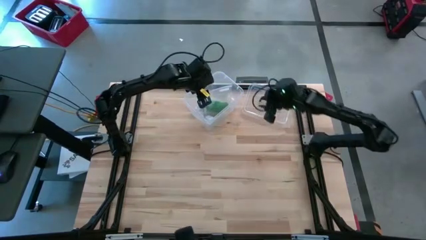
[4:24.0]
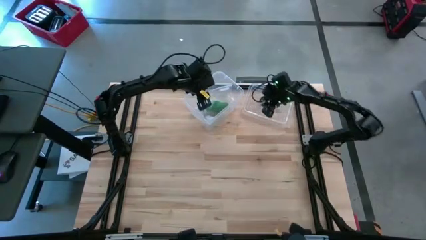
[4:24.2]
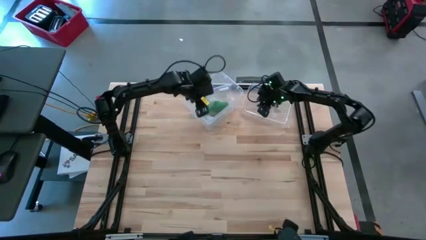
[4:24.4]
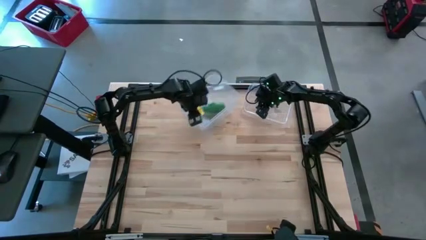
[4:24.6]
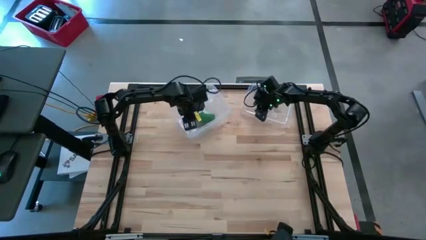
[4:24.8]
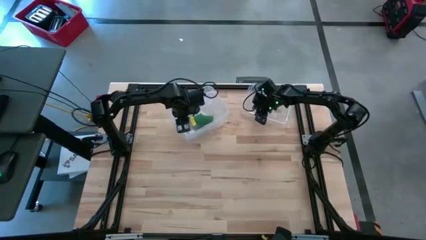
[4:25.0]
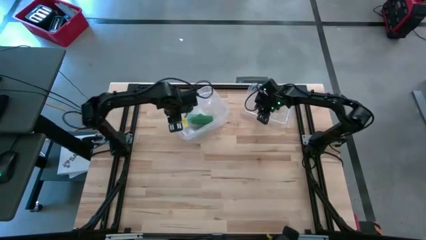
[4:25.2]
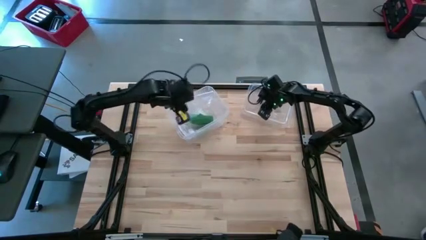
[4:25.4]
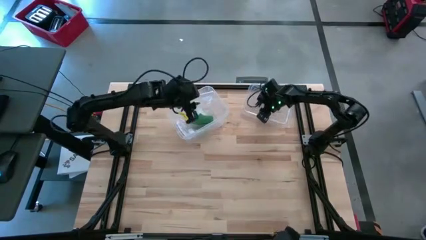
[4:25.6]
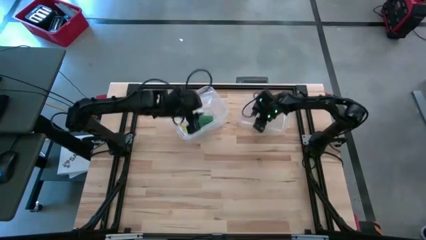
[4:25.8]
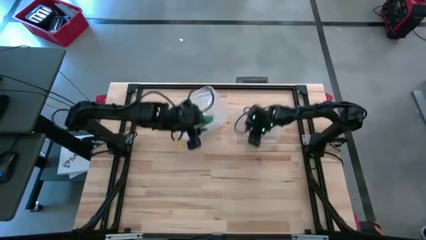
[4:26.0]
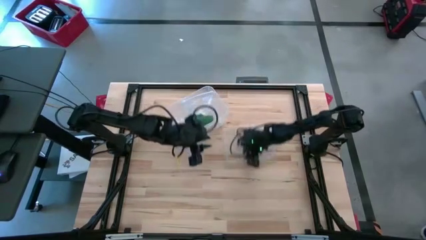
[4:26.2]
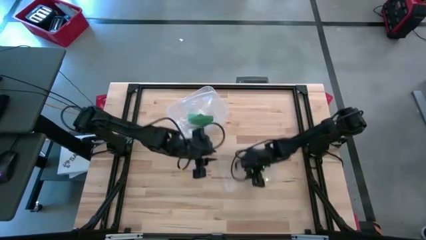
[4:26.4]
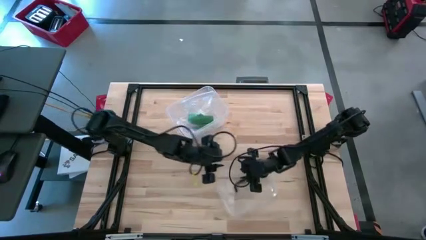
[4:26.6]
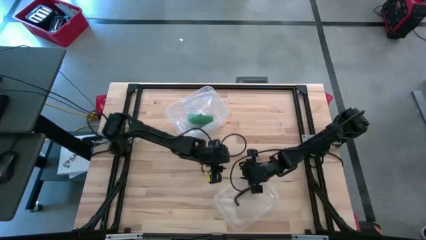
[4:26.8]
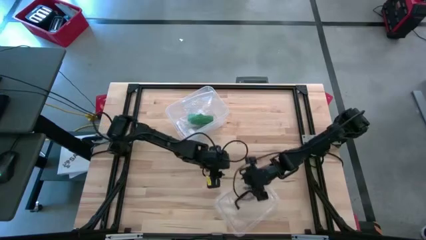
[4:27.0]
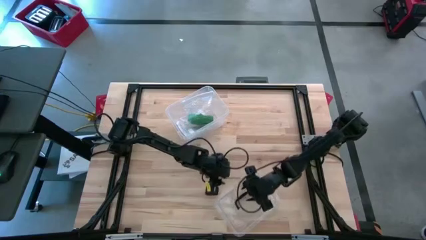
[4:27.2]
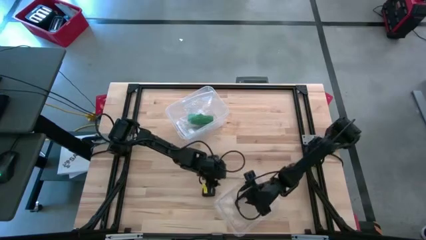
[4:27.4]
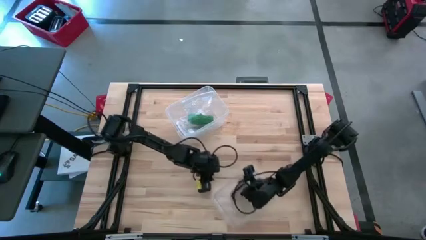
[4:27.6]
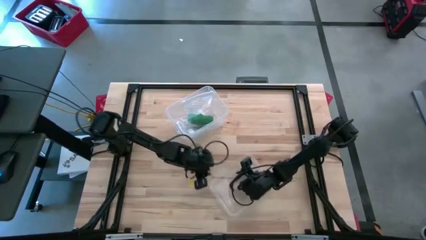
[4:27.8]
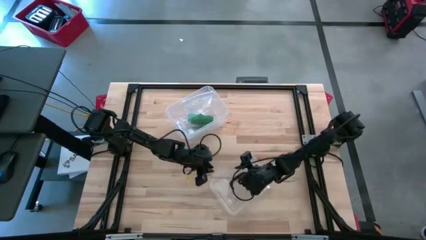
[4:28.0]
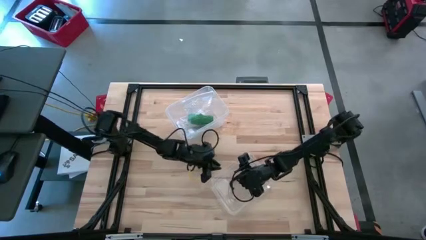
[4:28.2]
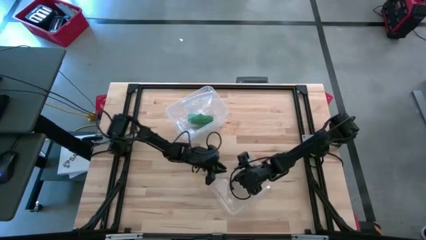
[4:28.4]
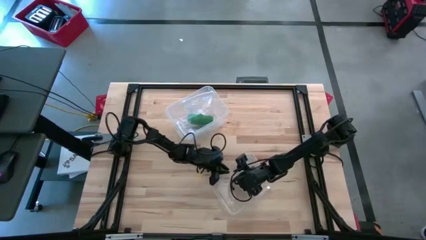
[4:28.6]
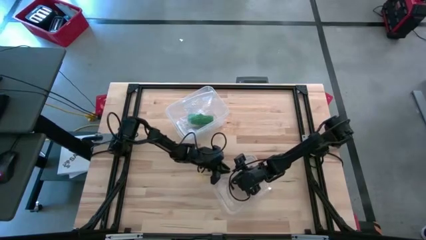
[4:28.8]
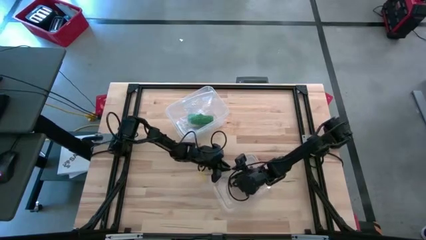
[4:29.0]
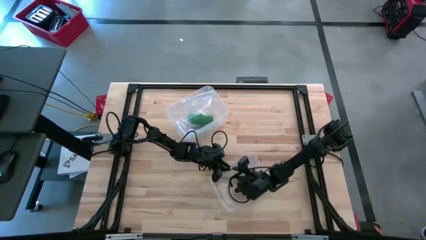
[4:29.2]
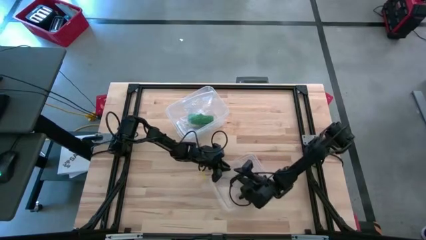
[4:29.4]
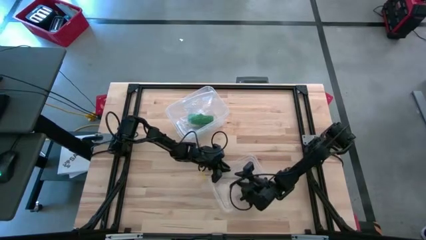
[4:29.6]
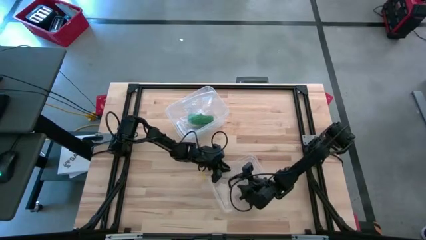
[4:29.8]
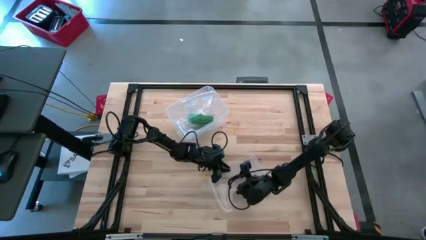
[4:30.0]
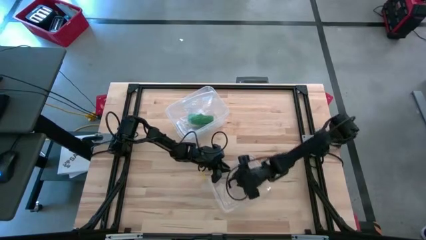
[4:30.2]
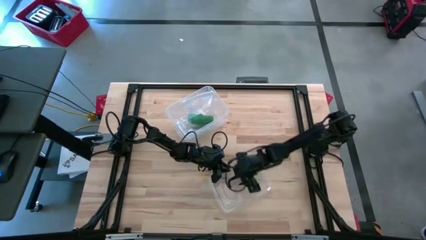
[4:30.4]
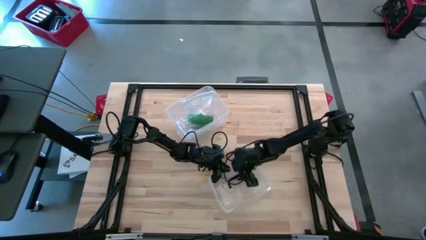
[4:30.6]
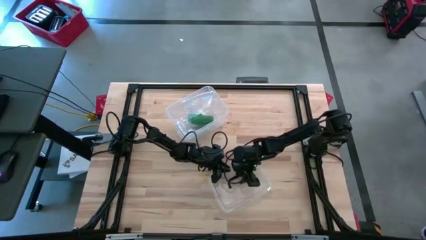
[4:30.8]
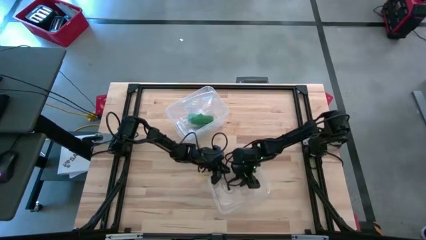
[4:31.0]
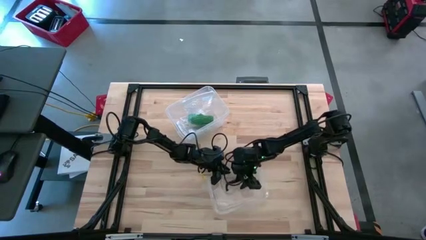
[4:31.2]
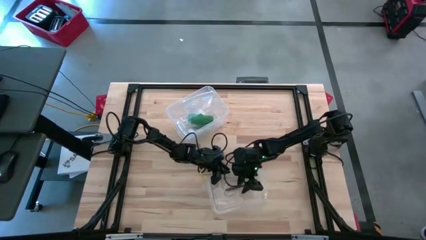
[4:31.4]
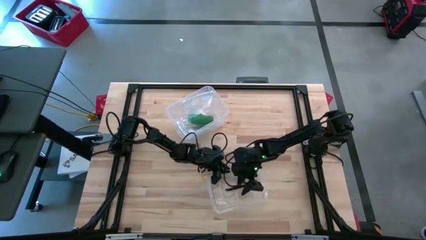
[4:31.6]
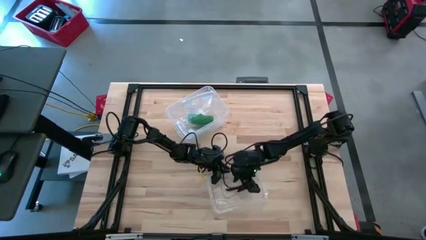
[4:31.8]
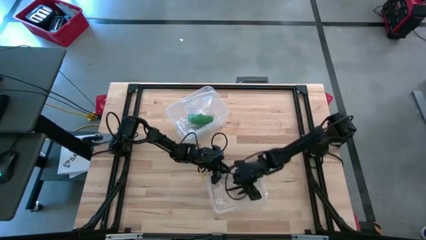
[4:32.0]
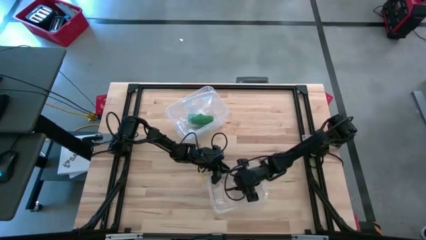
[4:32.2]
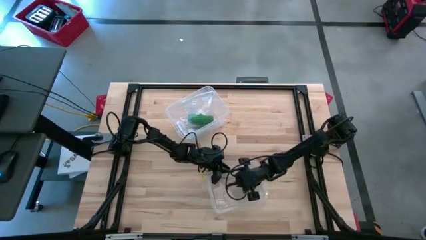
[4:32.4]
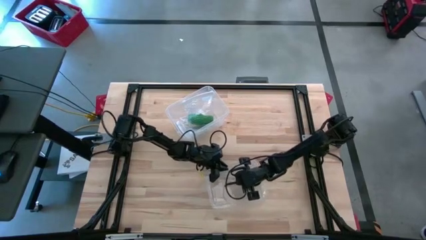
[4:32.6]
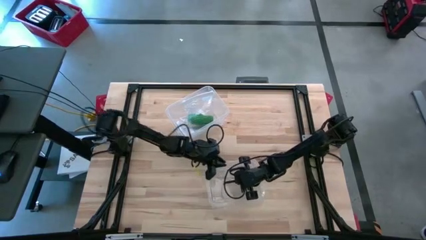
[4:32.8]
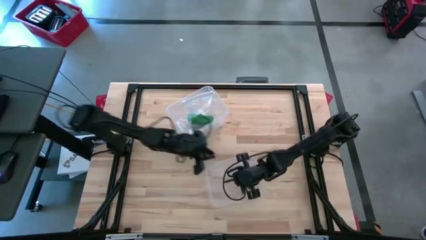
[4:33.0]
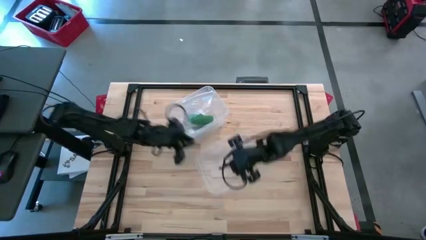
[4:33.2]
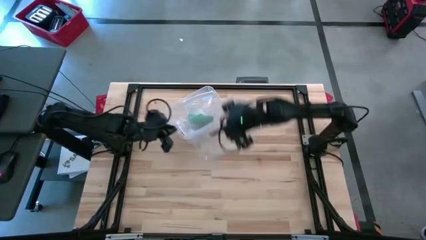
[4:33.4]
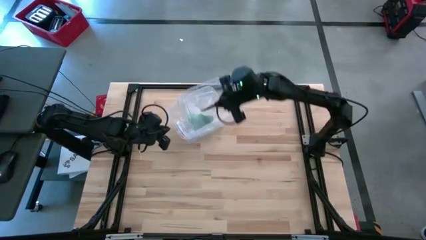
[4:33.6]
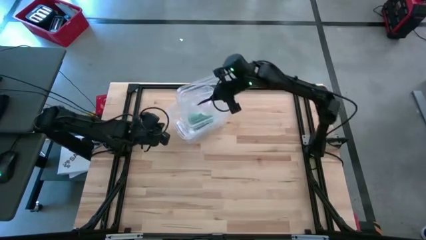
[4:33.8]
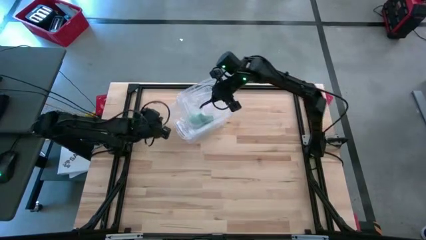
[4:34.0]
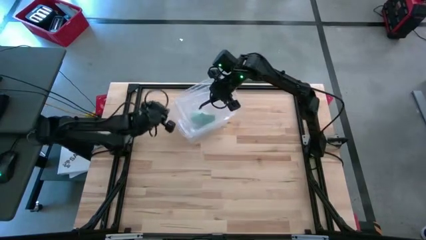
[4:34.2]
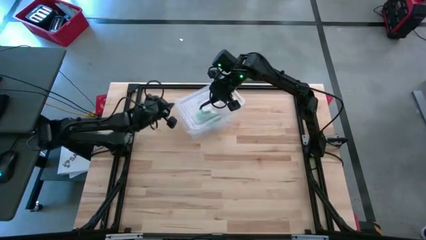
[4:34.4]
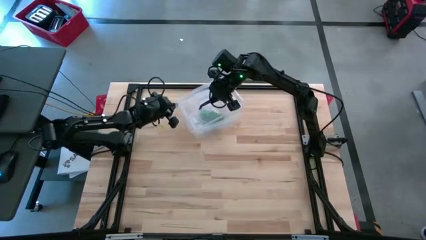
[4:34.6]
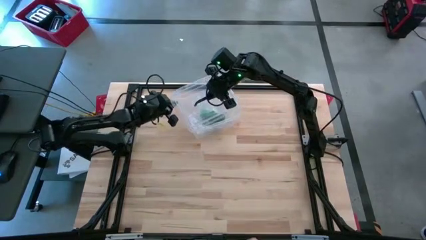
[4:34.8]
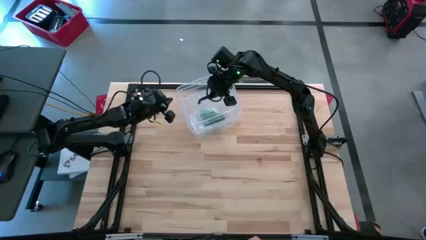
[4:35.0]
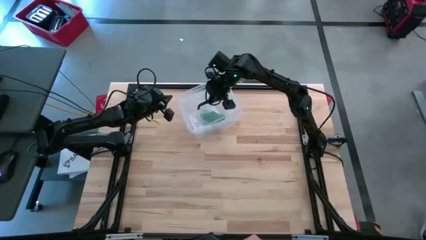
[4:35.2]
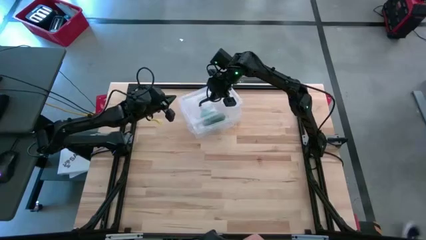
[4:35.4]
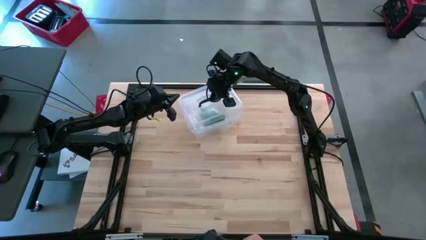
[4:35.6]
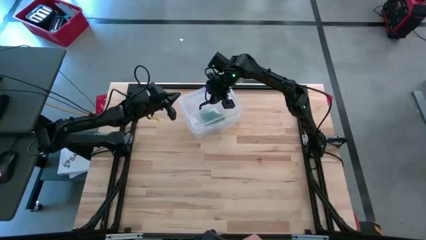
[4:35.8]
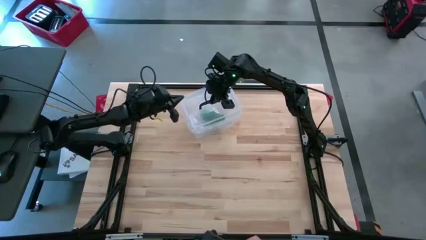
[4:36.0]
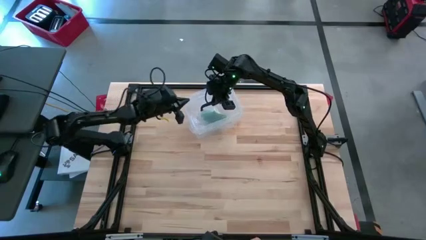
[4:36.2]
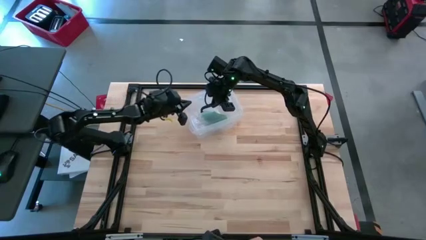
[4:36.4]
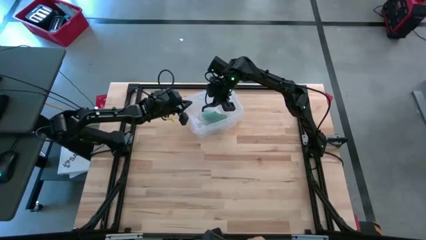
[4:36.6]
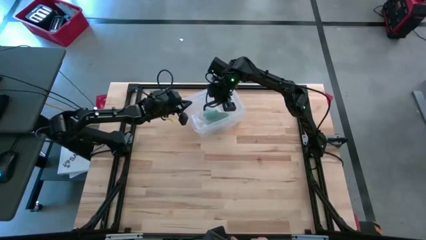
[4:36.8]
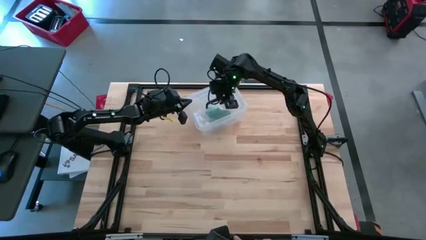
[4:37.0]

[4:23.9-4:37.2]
Task: Roll bandage
Close the transparent storage box

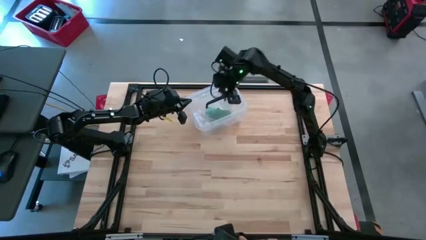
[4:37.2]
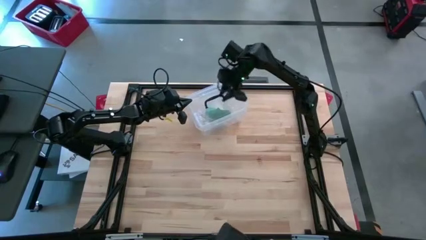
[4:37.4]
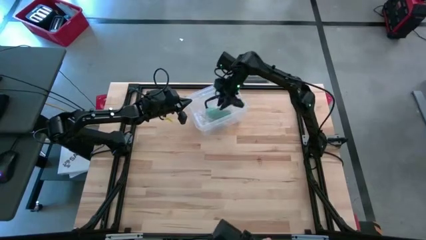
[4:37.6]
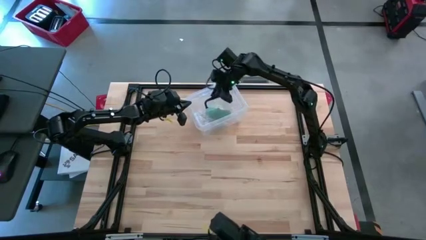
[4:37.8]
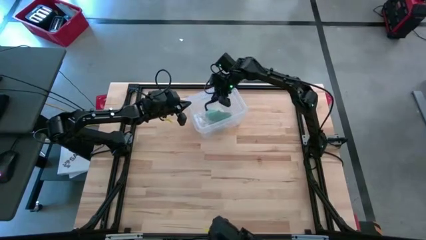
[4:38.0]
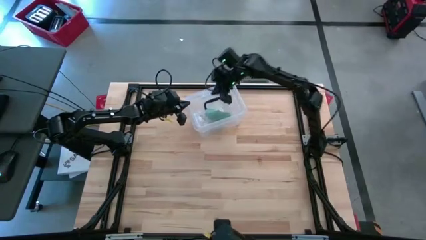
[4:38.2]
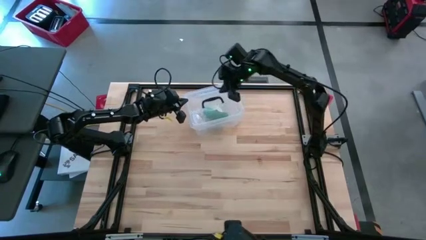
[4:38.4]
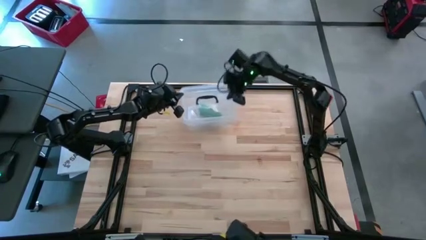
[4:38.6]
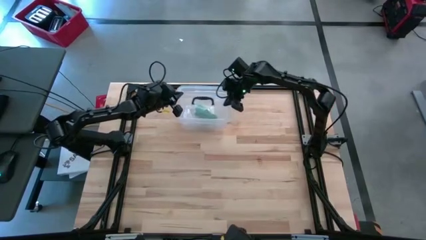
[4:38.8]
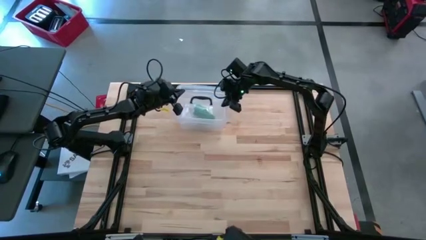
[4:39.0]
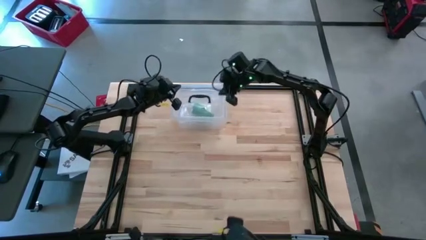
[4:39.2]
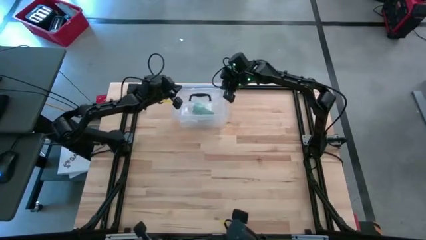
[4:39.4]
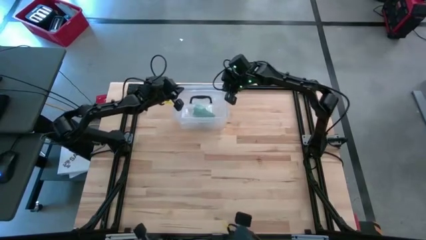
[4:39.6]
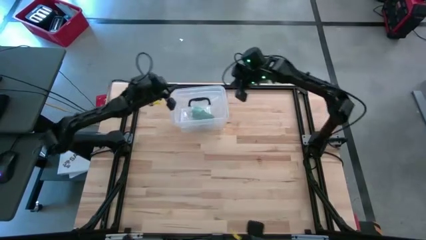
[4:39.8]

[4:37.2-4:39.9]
Adjust the transparent storage box
